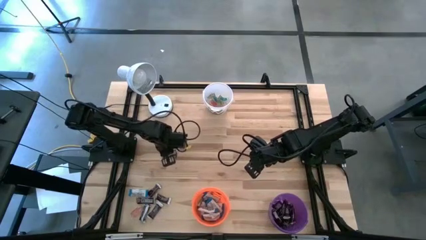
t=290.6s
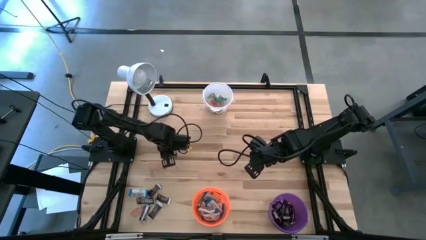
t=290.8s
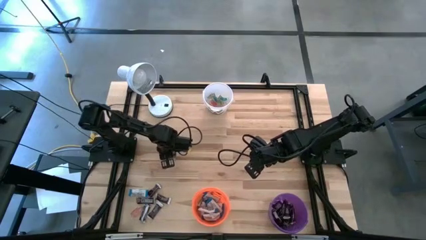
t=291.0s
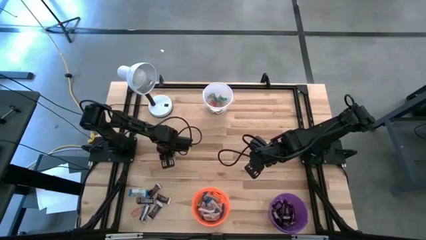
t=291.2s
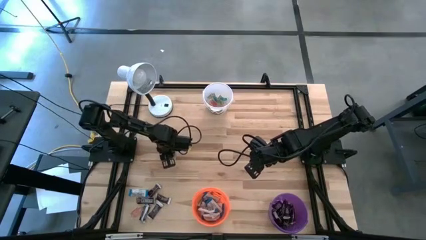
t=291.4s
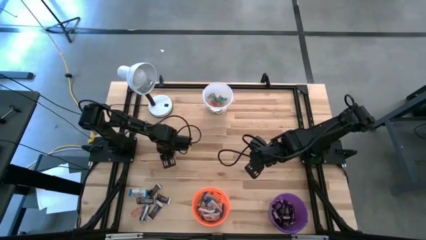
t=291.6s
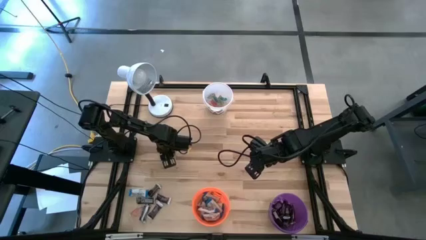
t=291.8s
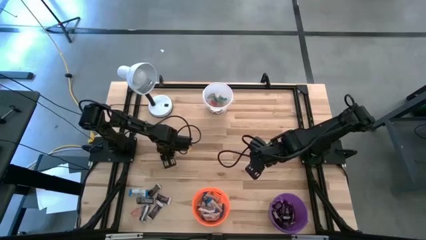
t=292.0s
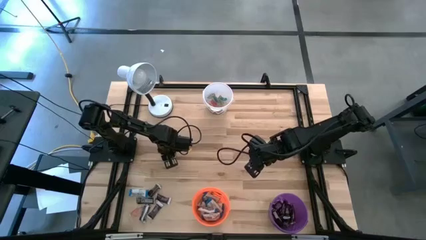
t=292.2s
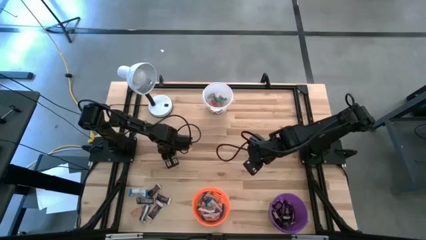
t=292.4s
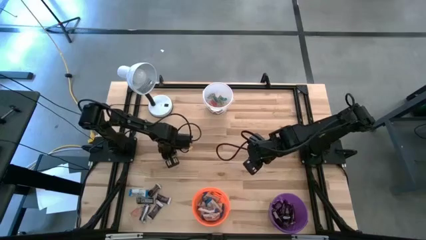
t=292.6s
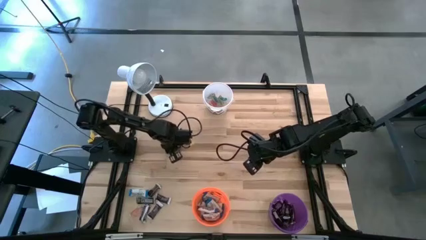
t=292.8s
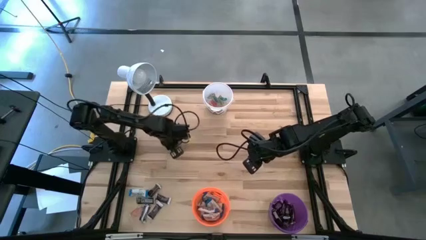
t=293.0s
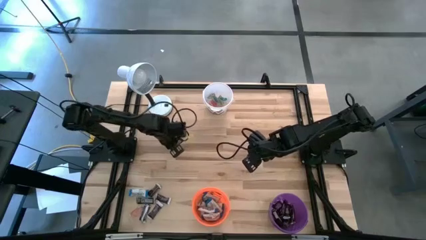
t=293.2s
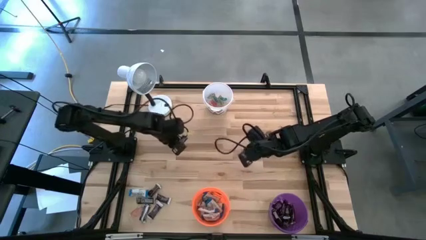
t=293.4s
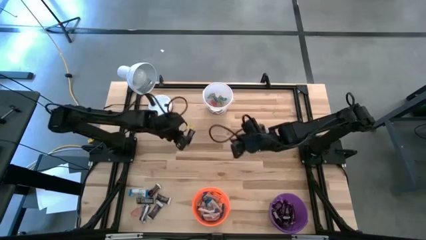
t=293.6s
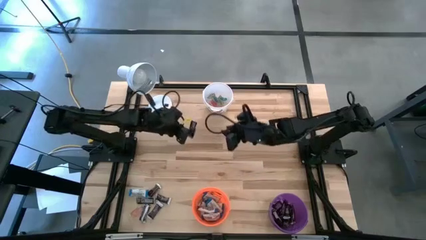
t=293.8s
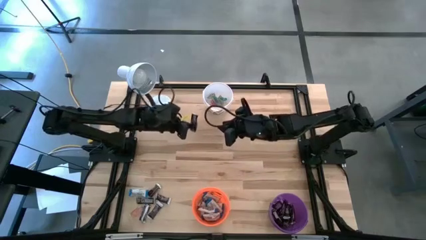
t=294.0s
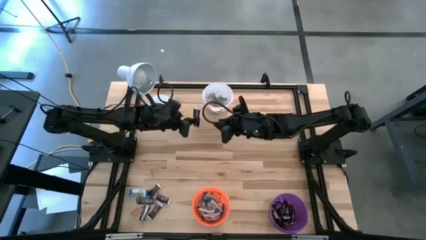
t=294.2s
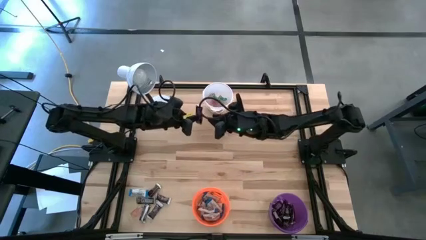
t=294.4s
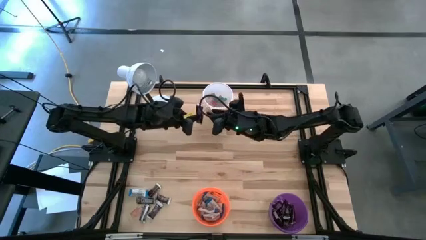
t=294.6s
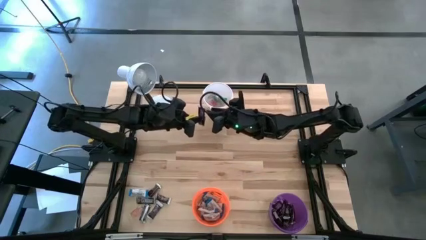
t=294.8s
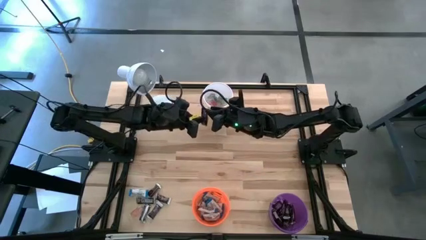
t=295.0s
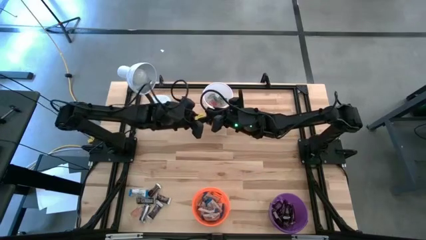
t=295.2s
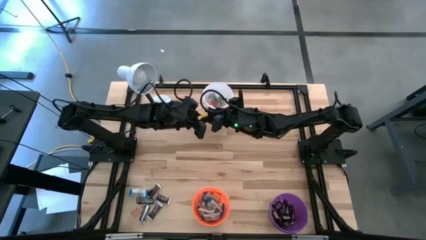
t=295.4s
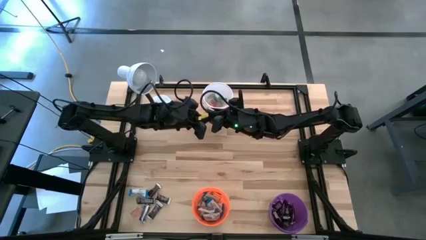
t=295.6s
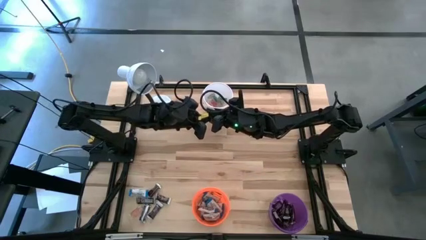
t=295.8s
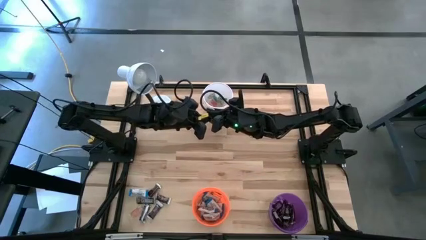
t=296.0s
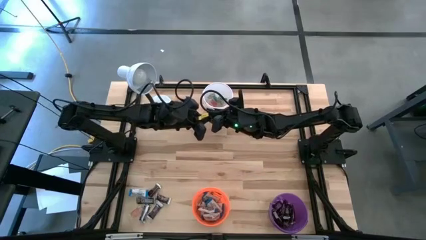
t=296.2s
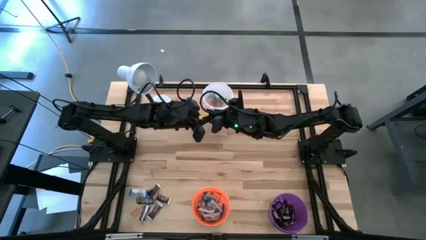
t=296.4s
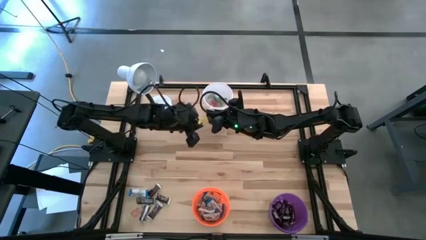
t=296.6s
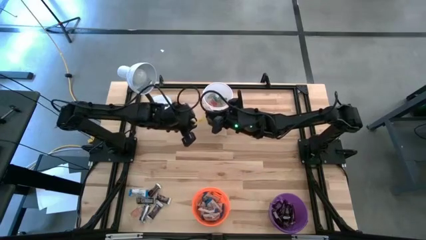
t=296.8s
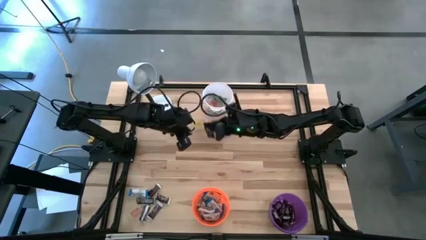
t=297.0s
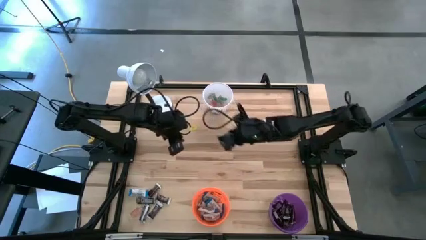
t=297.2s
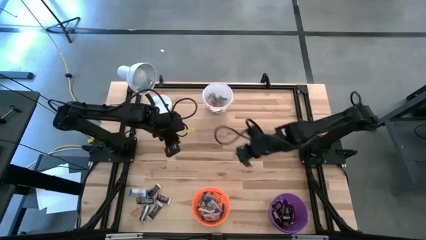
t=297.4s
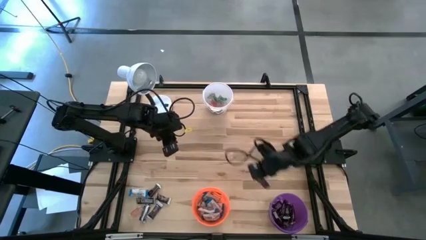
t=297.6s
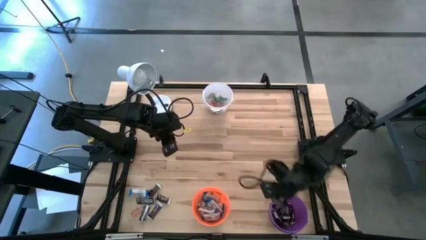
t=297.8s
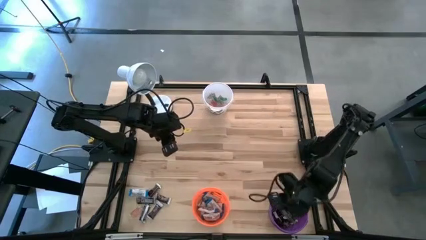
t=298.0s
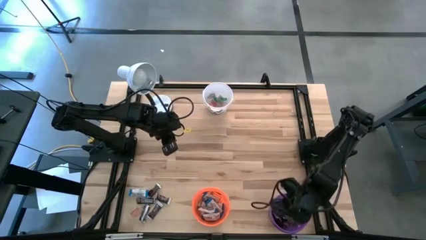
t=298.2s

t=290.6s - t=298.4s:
Task: Organize candy in baskets
Put the dark brown chocolate bar into the dark purple bucket

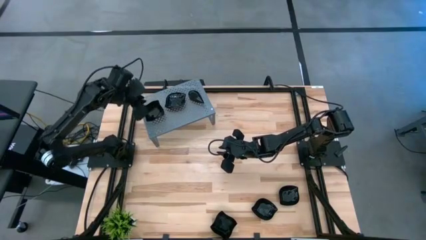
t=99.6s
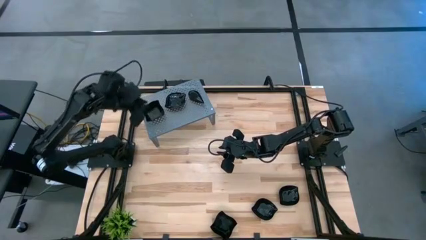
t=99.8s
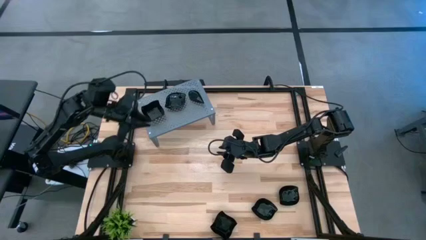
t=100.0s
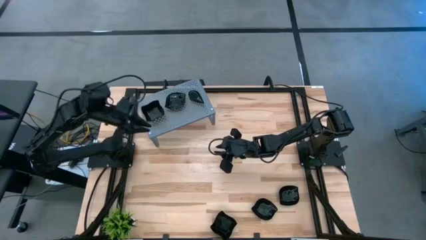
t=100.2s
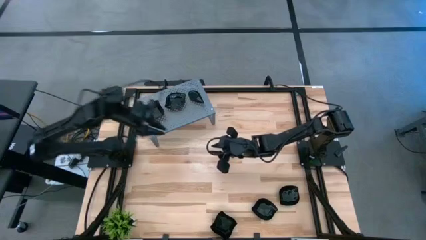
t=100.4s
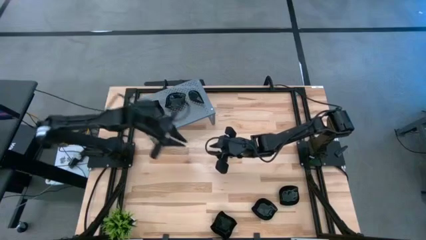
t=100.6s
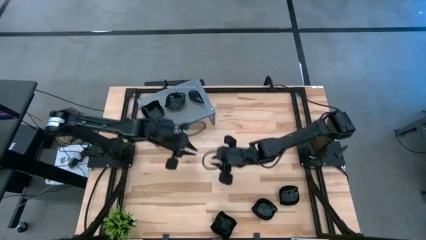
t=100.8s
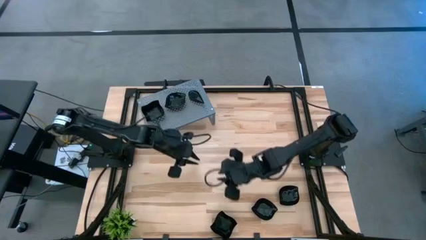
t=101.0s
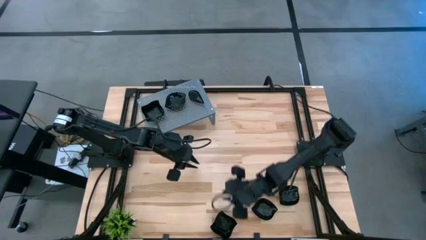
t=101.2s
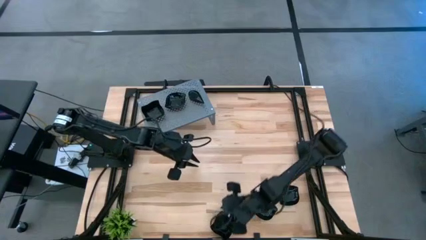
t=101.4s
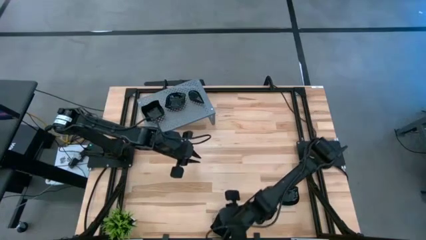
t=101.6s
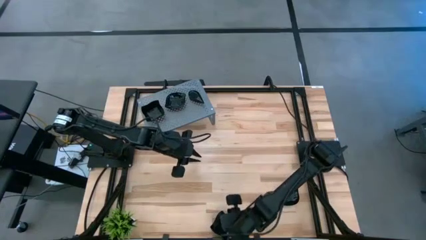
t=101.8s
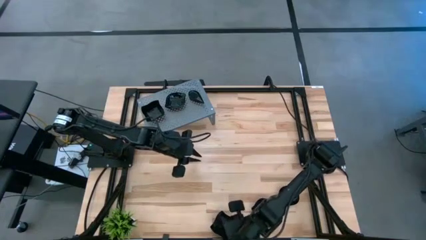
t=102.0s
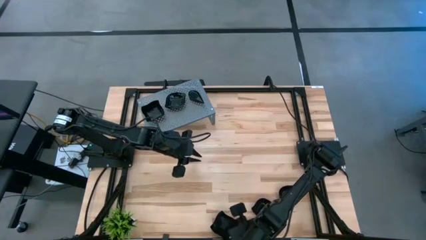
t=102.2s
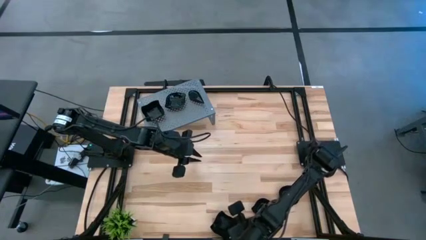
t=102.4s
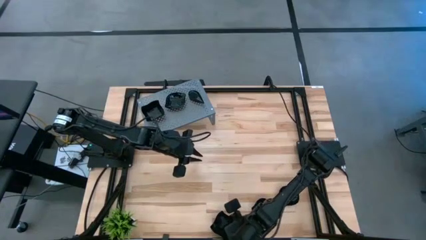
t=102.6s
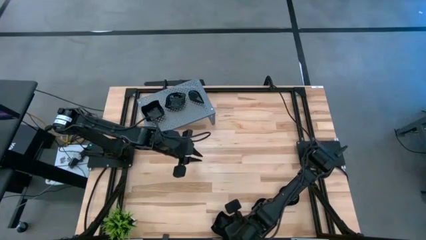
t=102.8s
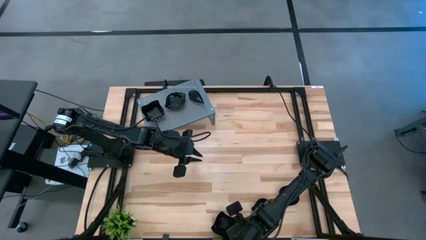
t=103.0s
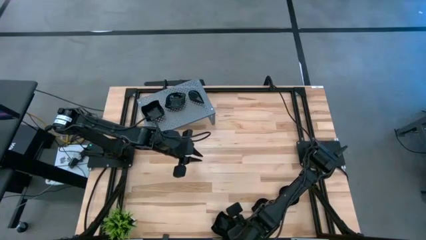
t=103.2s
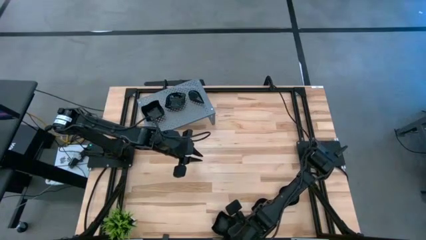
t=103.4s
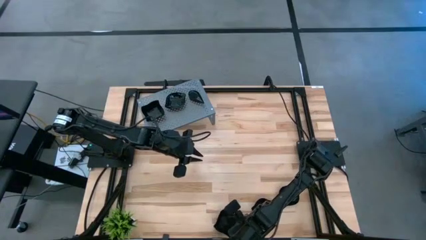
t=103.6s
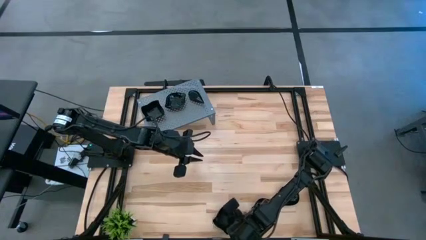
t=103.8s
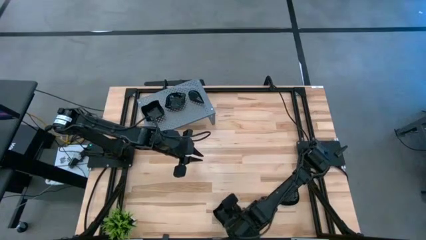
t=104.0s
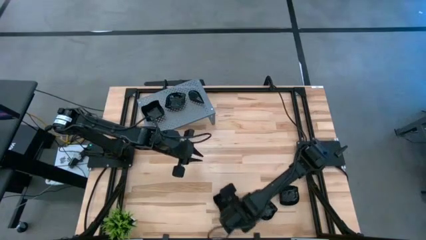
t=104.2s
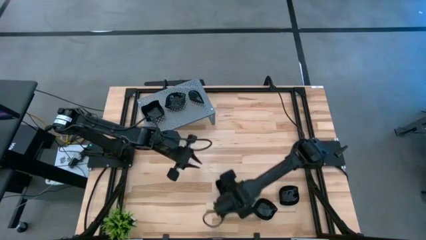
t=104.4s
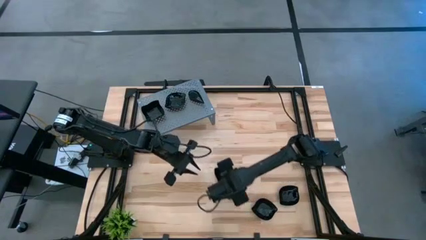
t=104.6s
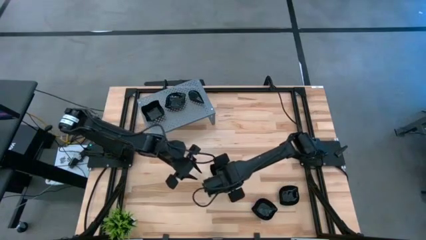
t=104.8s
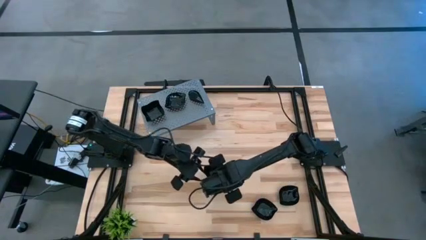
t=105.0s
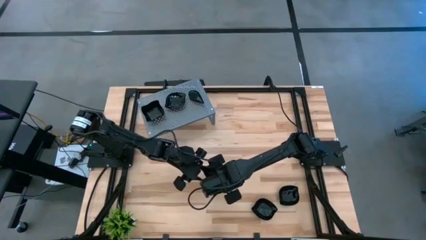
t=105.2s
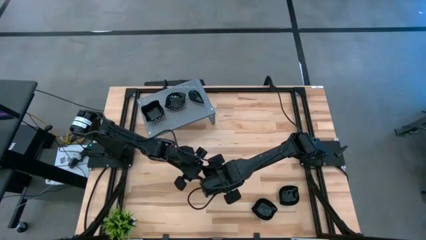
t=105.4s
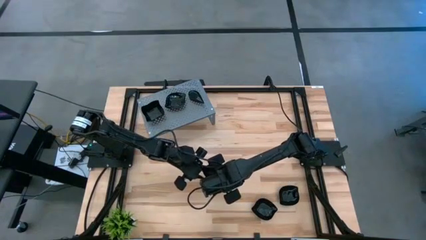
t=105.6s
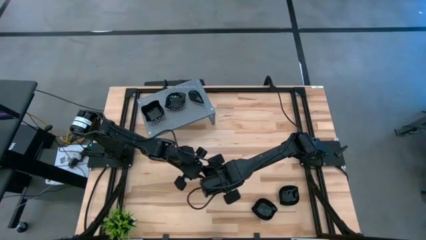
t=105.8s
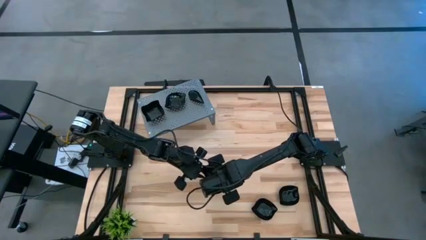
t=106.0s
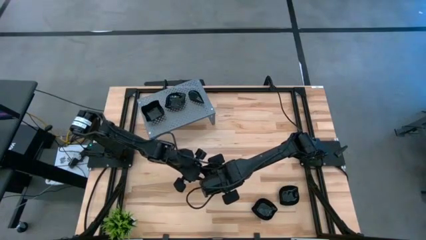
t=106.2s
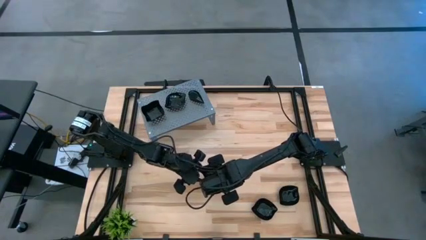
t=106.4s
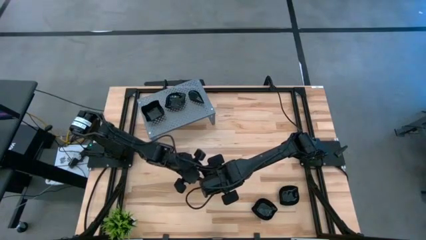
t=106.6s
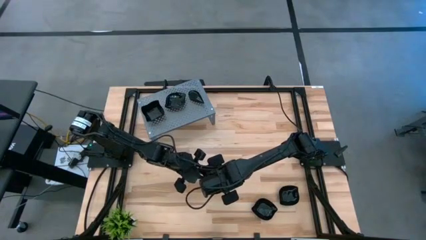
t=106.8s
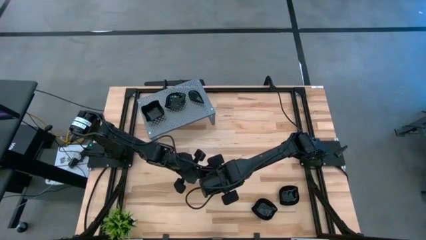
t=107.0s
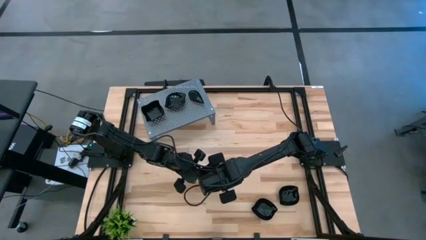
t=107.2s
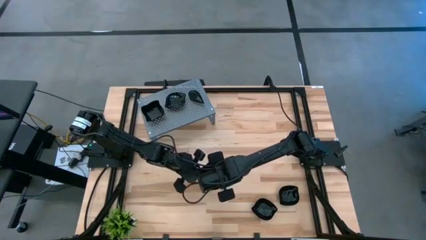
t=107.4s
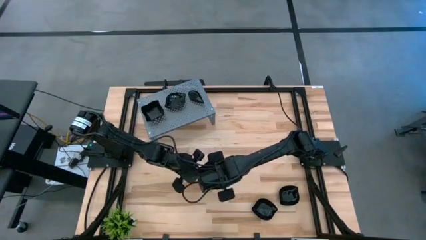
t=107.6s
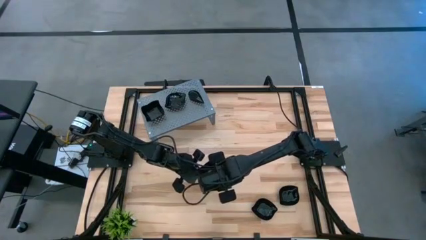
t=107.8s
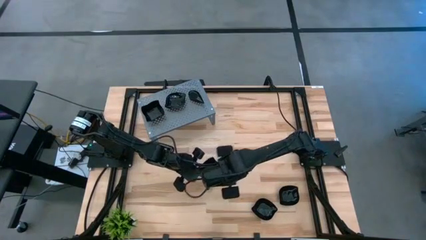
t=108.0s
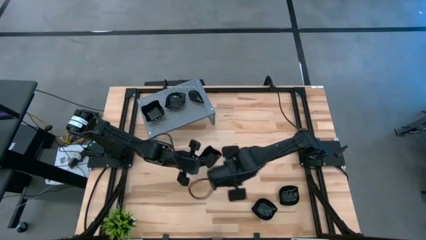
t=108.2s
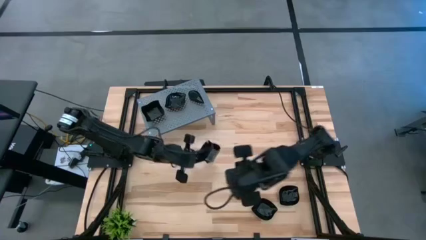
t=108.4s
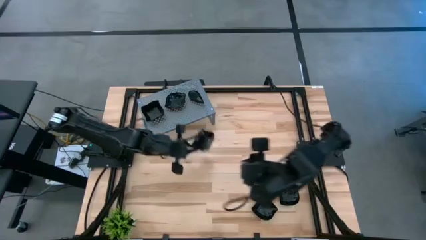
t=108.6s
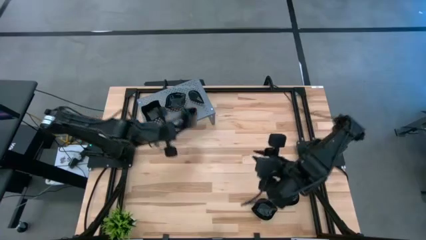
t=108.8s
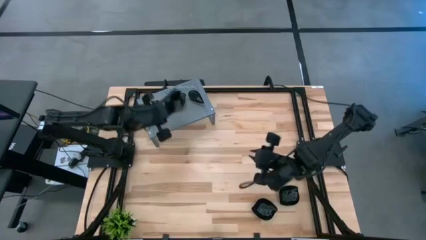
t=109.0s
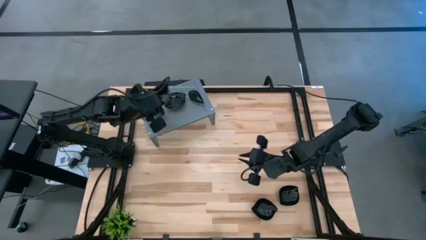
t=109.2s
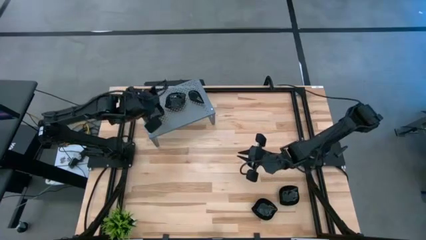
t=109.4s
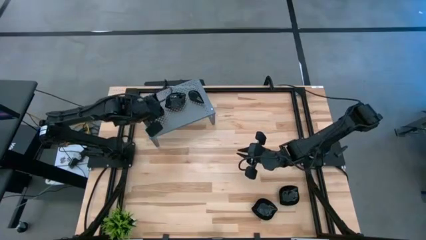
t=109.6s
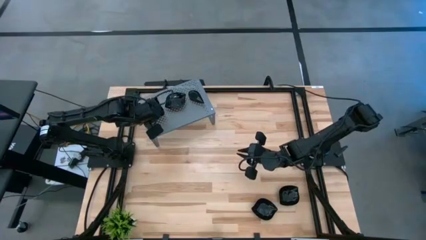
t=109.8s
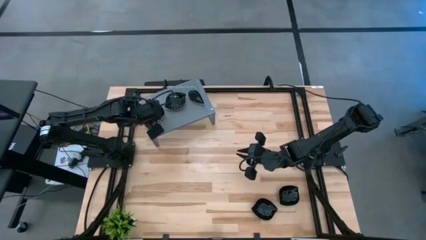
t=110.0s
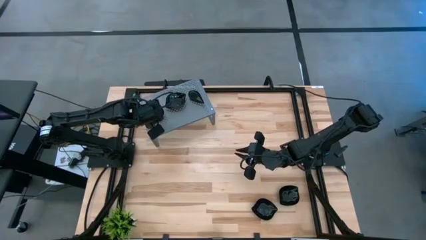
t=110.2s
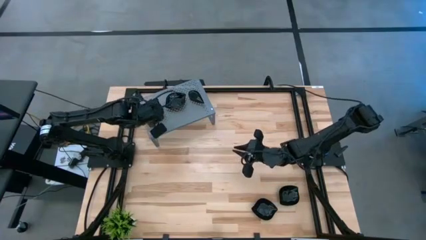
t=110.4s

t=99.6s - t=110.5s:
Task: Pick & Place Mini shaped plates
Stack the black distorted square plate on top of the black distorted square plate on the shelf
